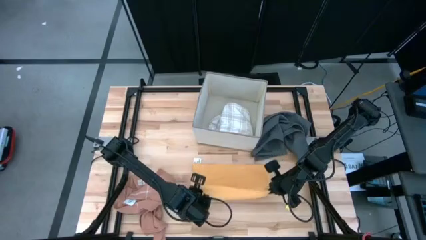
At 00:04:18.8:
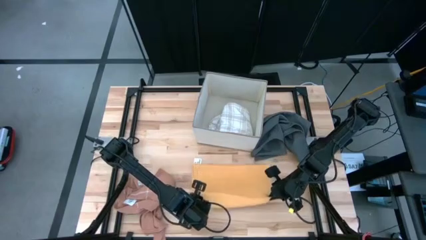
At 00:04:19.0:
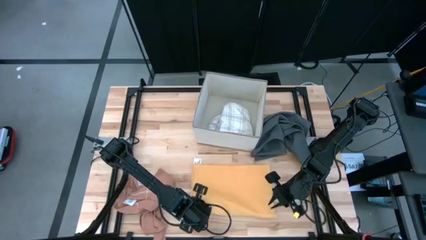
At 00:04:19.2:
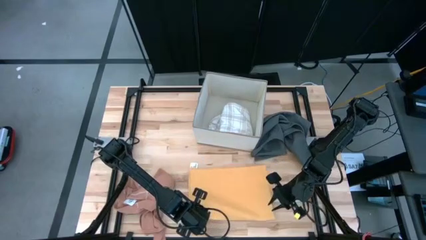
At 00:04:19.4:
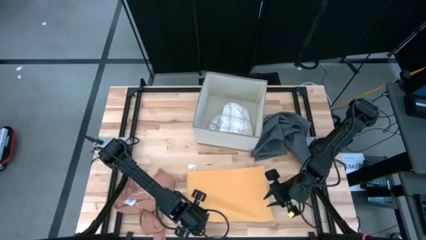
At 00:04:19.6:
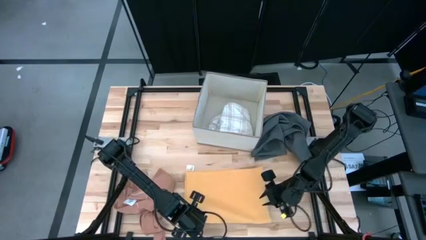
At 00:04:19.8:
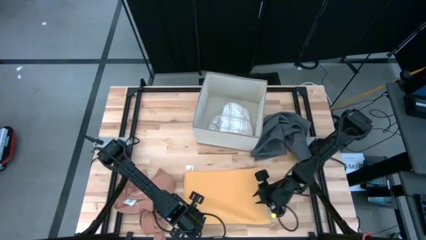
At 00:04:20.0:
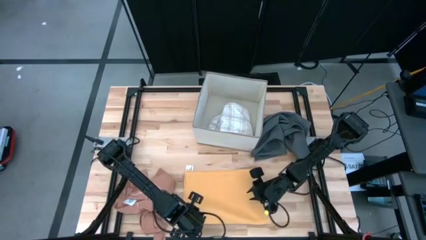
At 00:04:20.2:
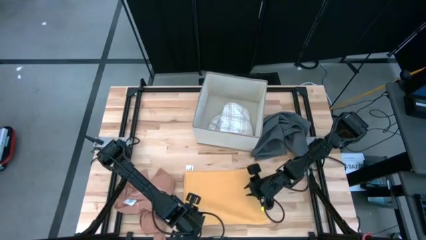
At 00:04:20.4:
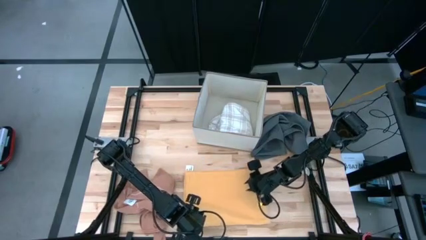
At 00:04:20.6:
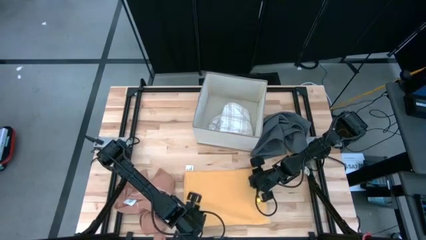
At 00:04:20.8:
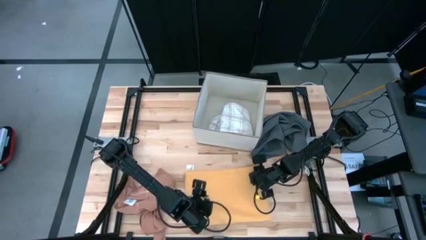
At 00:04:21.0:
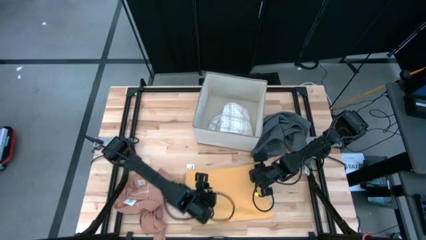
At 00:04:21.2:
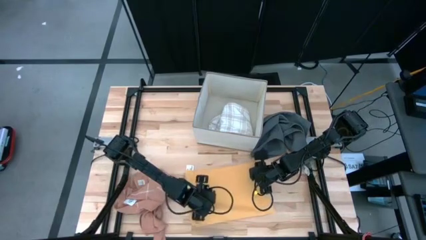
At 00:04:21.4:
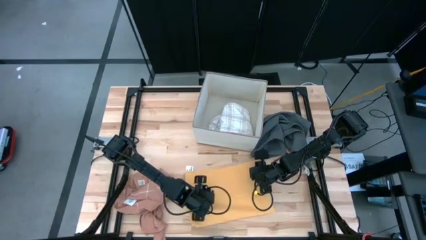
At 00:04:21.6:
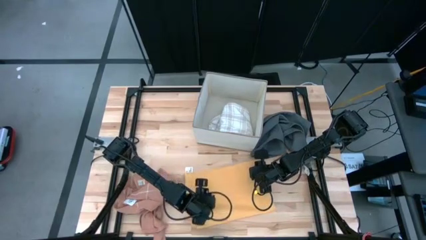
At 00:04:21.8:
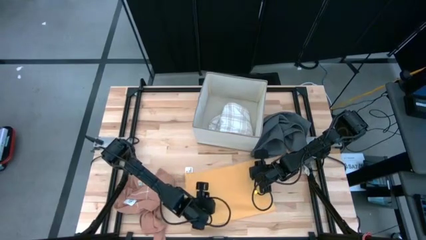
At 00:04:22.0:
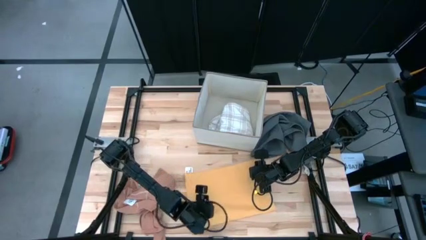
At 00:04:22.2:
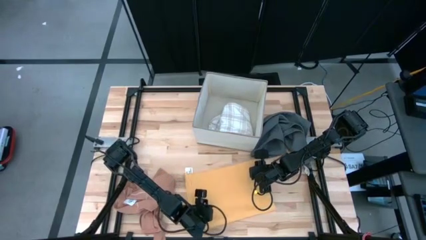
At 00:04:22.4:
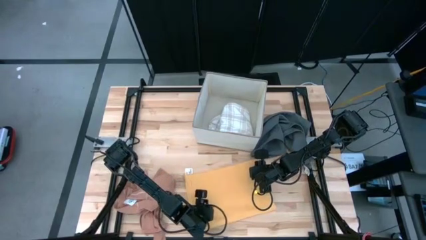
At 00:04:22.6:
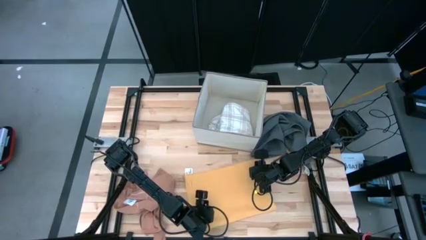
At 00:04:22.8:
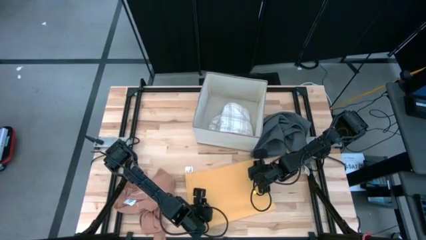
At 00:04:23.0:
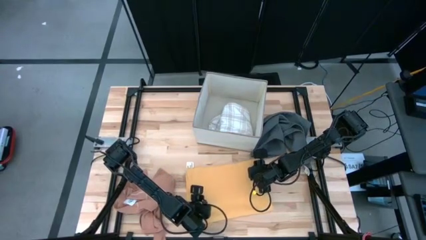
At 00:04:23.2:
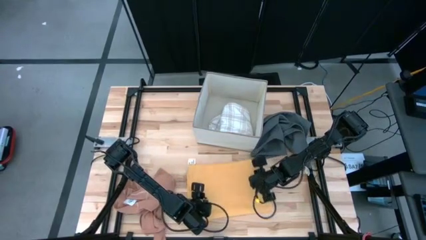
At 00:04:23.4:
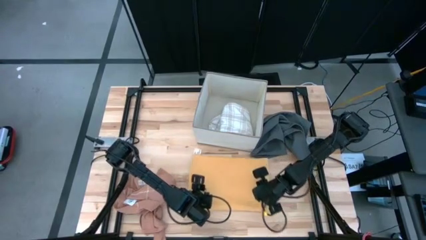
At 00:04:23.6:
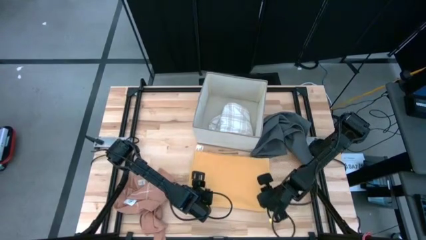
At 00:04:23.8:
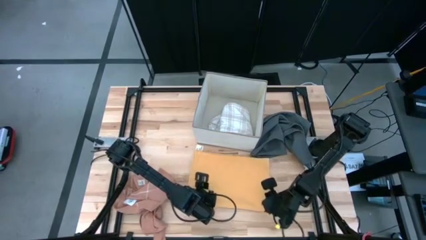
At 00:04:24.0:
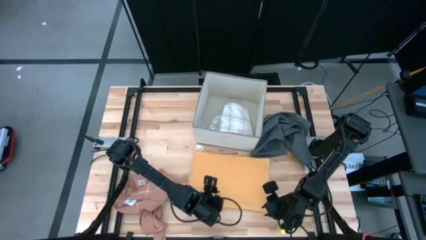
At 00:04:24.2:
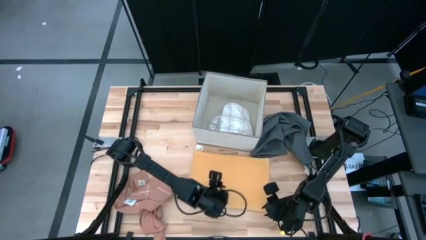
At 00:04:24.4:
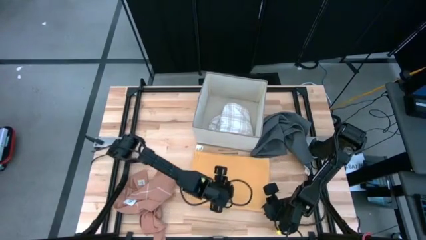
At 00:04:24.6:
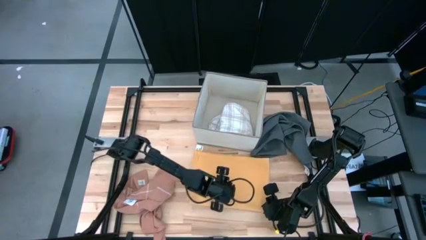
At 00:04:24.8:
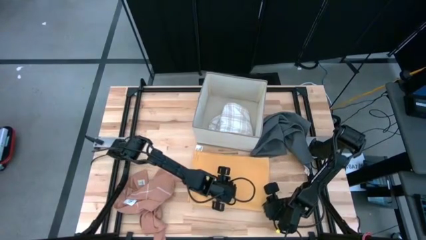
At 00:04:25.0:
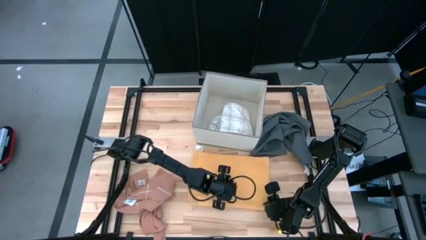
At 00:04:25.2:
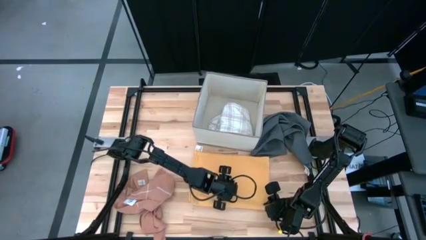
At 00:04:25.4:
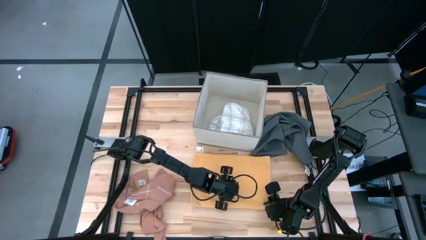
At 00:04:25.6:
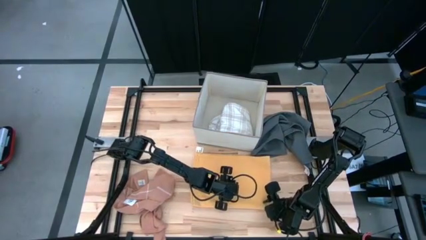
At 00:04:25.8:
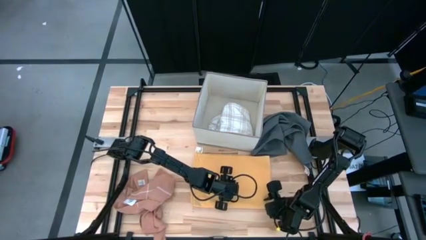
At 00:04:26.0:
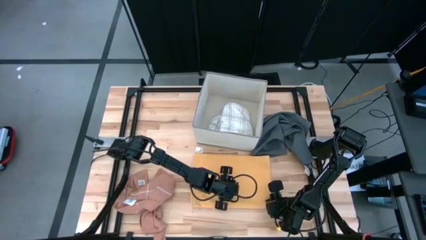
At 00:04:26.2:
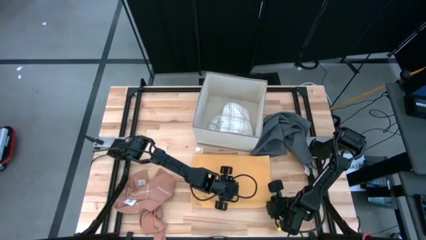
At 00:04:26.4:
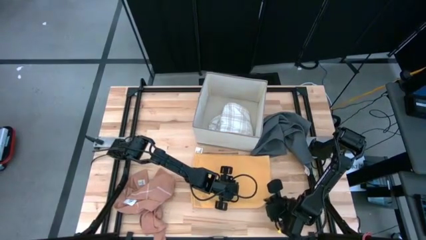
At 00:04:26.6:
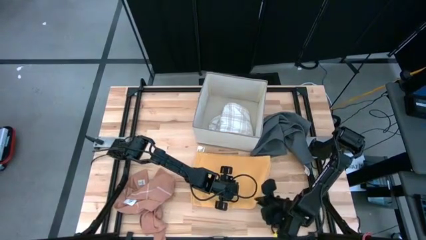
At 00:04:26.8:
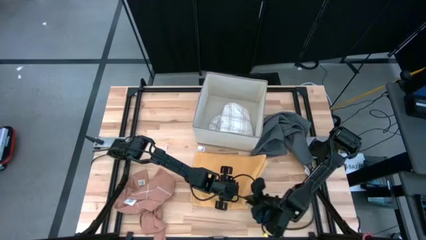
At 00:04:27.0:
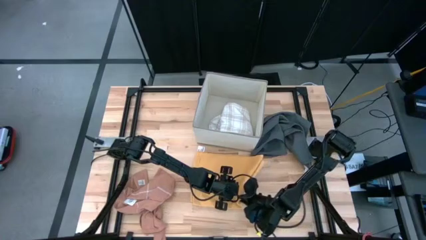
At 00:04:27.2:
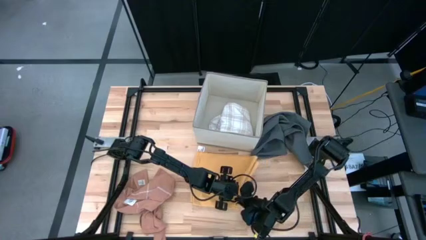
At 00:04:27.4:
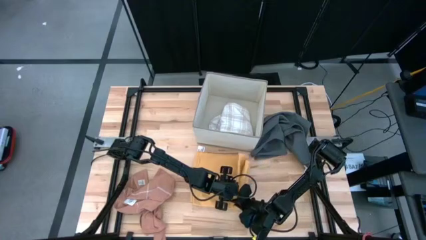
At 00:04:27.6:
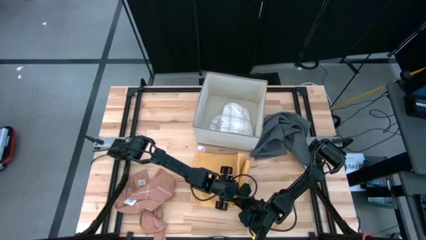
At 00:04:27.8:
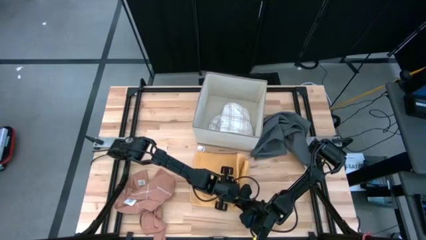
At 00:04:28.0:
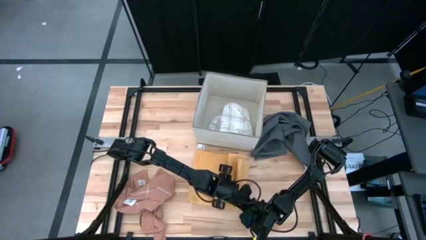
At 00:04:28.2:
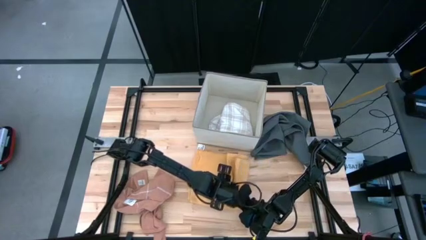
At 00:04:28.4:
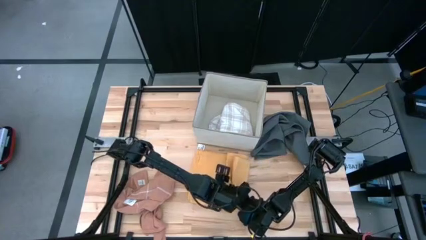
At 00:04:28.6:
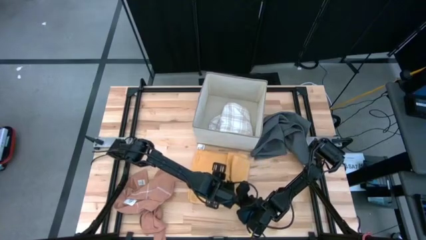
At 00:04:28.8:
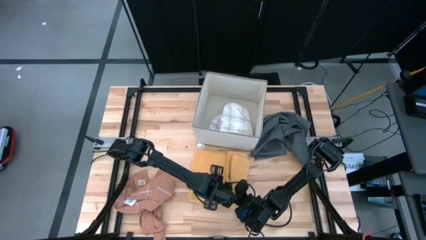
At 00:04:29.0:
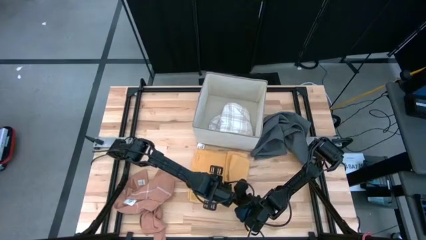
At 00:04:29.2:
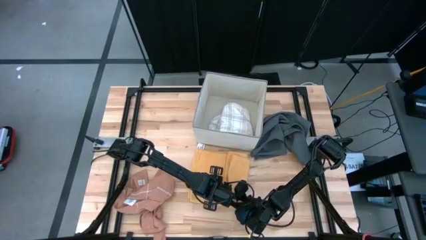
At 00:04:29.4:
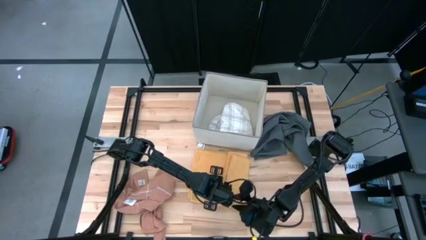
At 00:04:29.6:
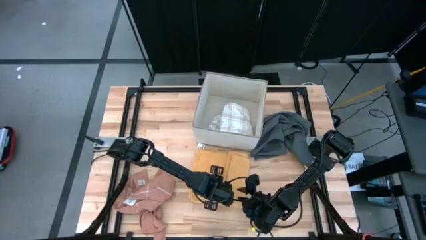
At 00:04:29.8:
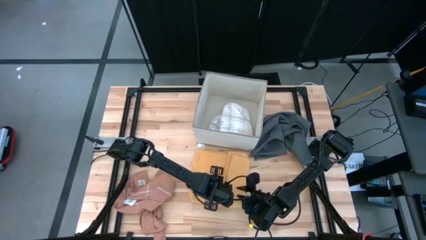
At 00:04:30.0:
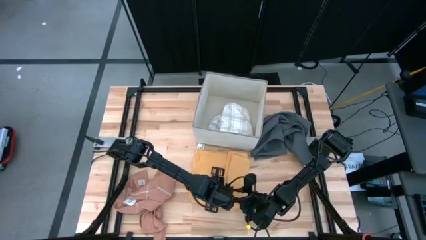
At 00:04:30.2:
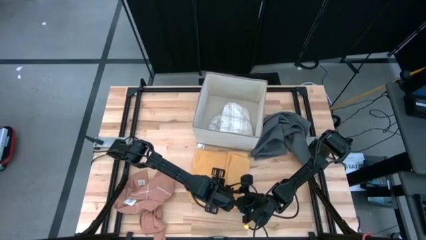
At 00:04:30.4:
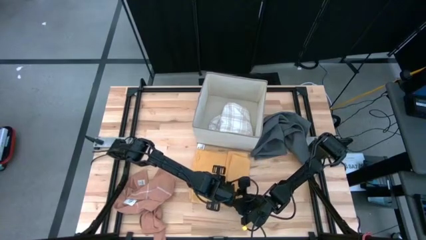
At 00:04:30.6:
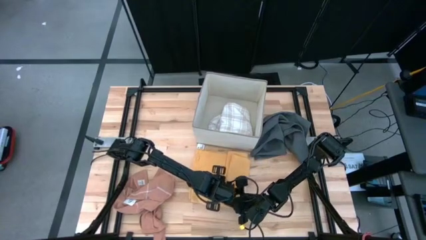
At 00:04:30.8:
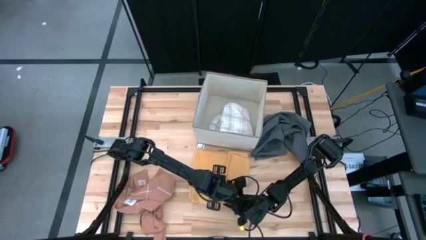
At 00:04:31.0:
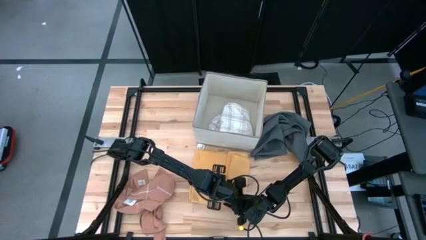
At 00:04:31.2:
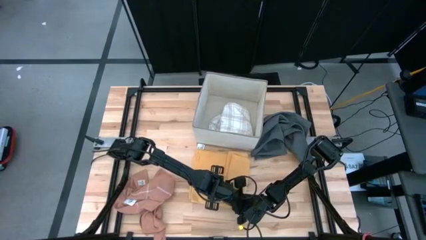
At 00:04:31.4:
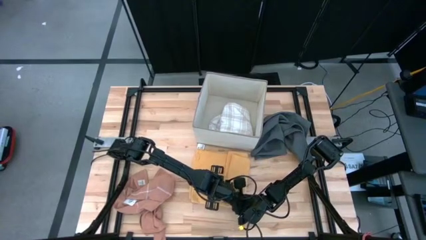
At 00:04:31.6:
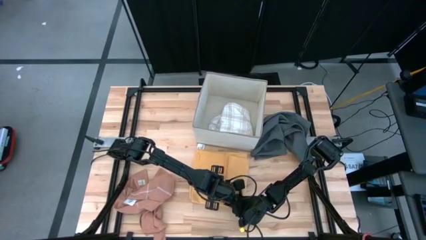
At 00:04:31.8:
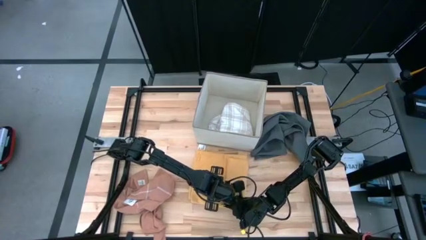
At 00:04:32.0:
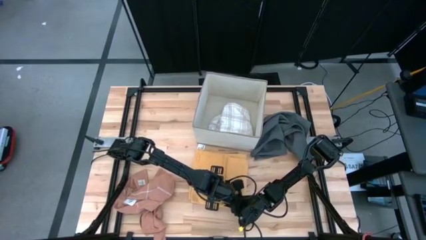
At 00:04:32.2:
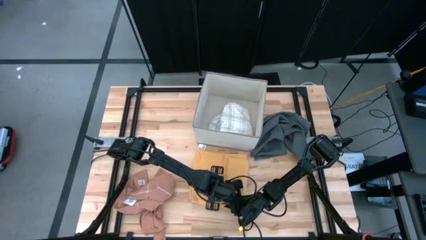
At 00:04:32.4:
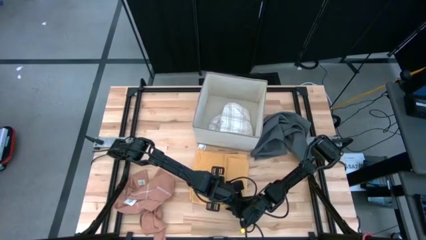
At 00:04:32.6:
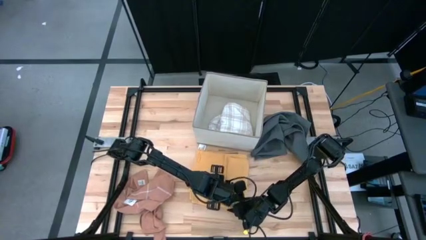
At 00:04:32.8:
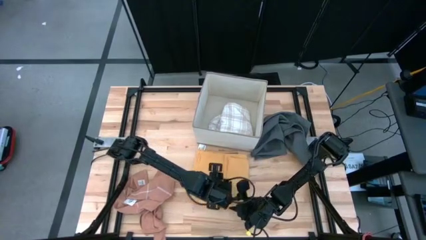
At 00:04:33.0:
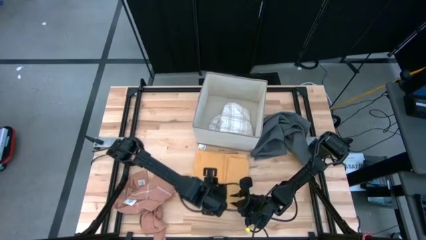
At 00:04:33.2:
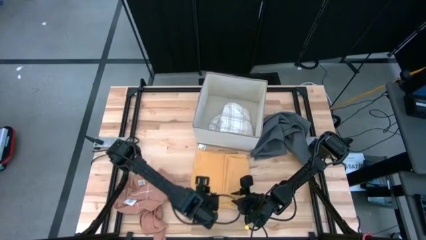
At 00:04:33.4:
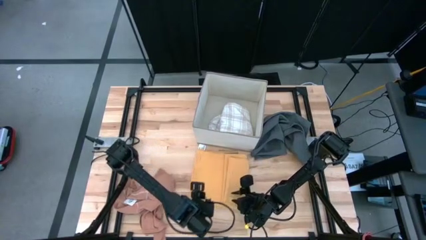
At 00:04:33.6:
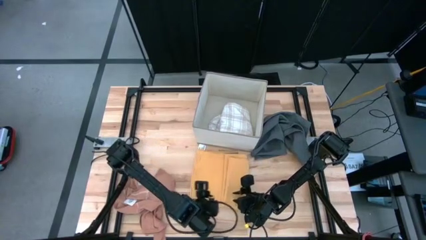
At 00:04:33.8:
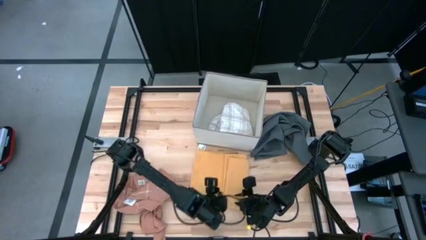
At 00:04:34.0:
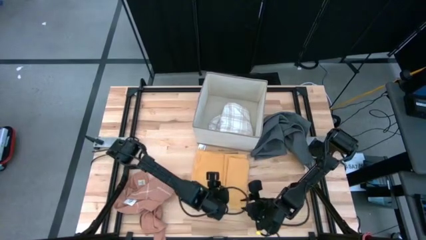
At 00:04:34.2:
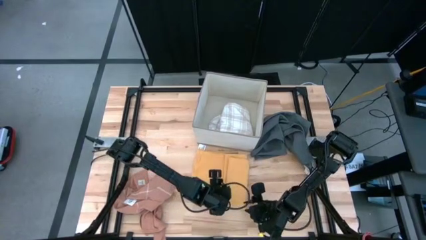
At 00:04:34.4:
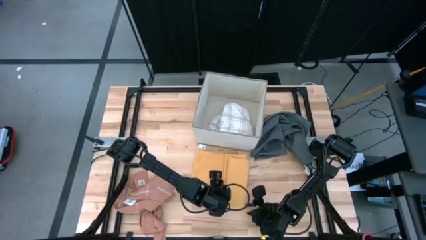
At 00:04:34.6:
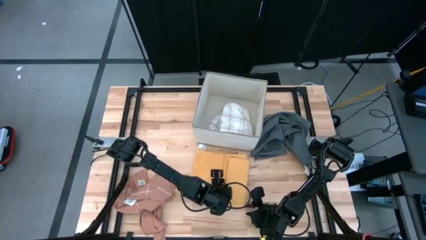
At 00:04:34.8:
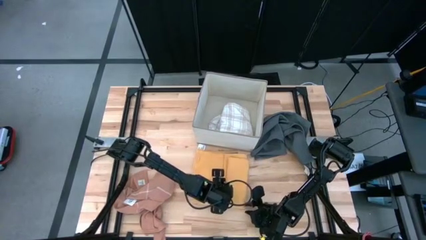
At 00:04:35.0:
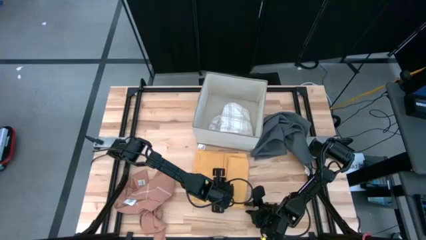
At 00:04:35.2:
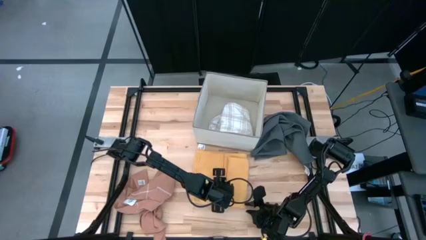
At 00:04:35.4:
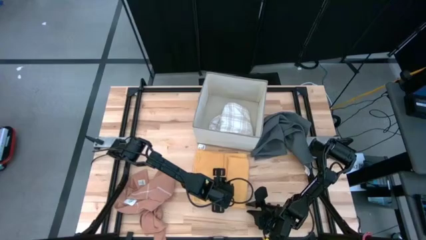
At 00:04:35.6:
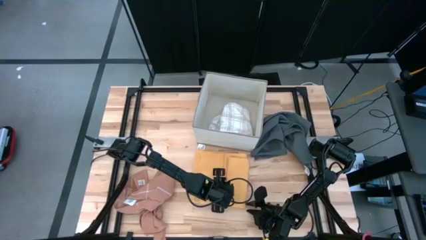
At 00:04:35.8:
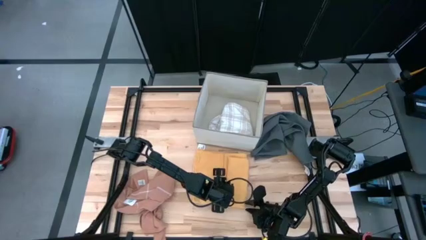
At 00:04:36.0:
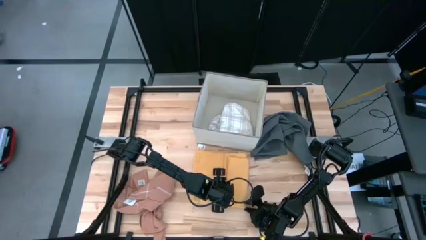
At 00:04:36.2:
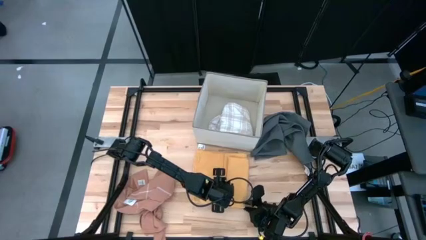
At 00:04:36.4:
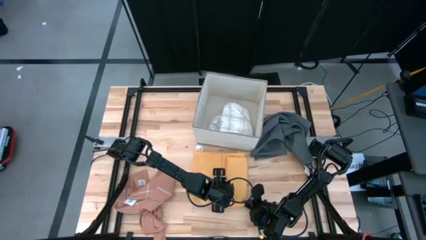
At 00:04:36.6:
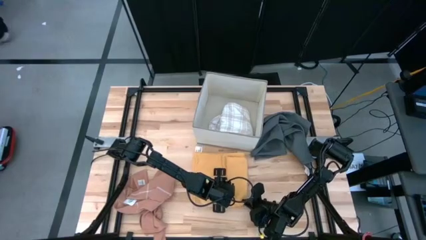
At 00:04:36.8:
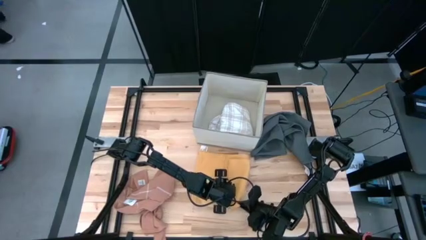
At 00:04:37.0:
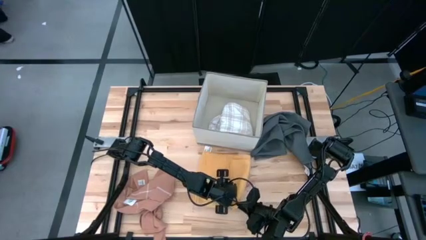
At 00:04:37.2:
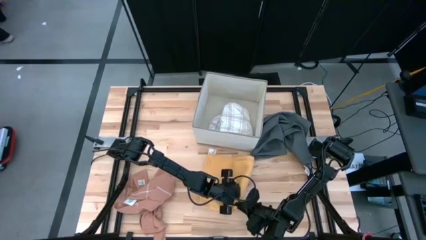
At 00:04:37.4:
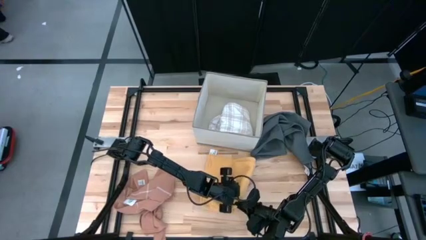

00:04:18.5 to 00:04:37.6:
Task: Fold towel
Fold the yellow towel
